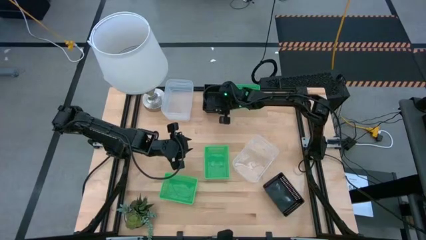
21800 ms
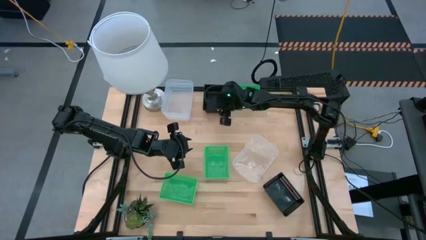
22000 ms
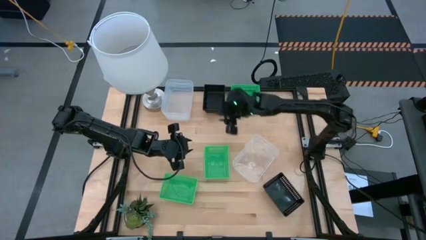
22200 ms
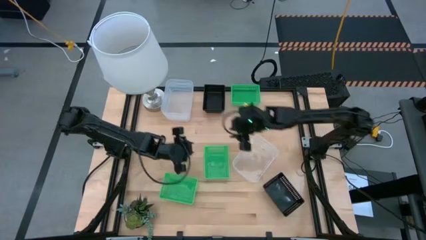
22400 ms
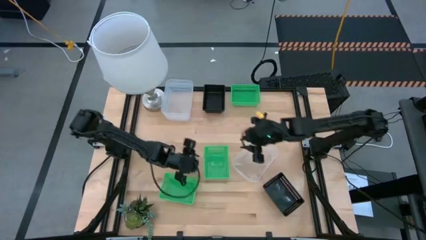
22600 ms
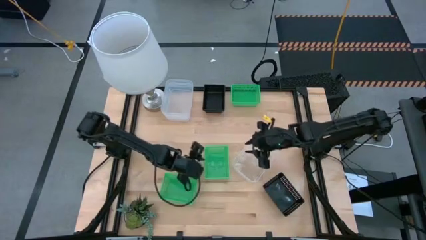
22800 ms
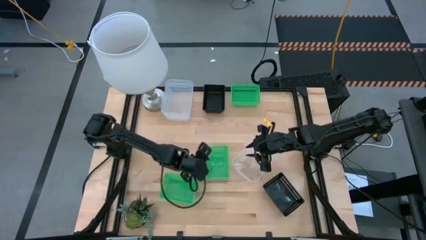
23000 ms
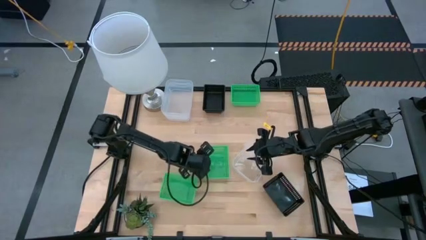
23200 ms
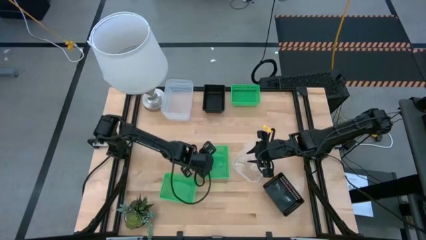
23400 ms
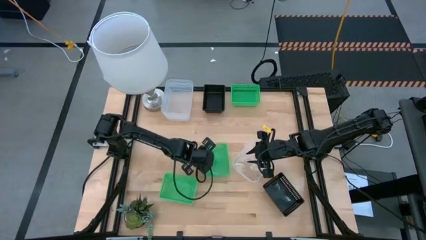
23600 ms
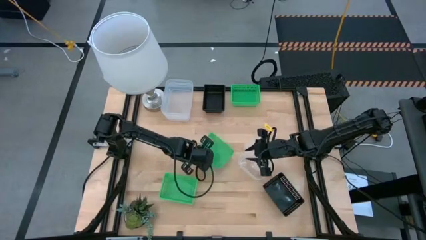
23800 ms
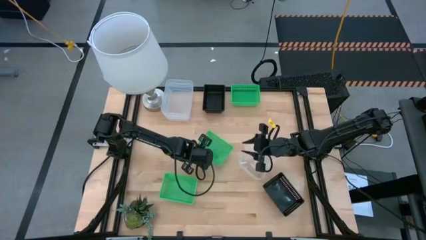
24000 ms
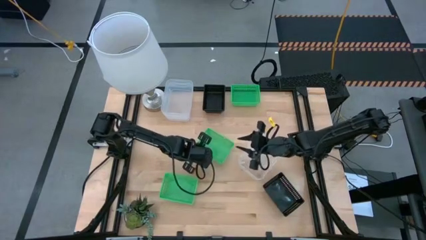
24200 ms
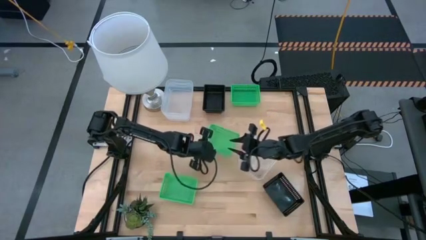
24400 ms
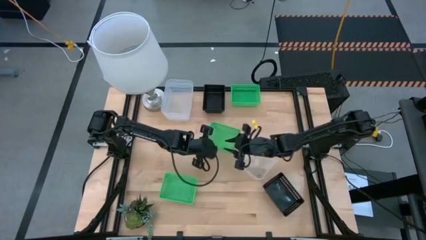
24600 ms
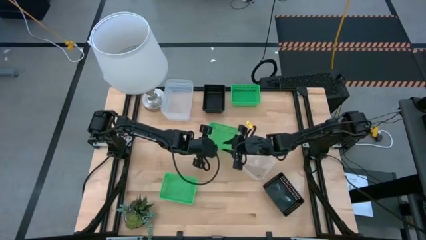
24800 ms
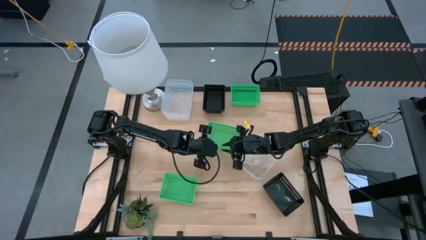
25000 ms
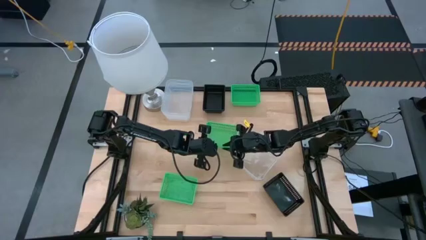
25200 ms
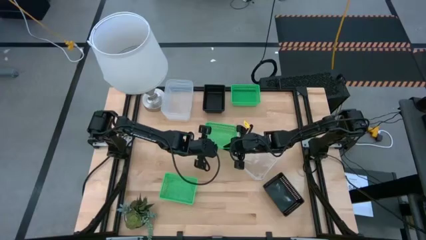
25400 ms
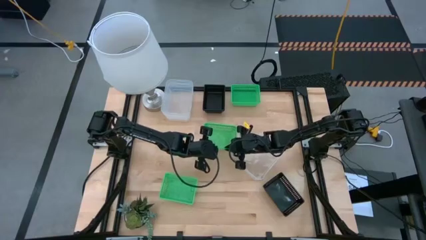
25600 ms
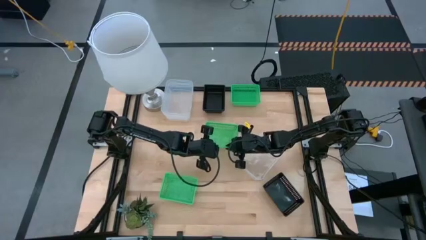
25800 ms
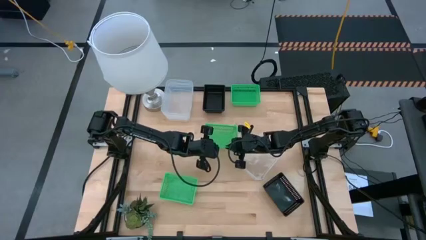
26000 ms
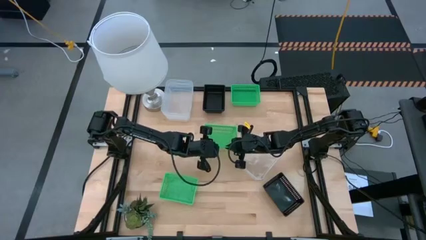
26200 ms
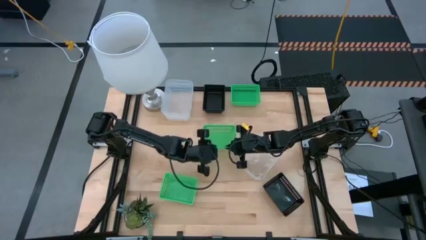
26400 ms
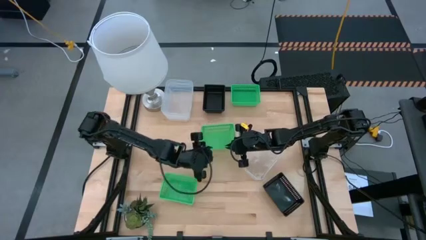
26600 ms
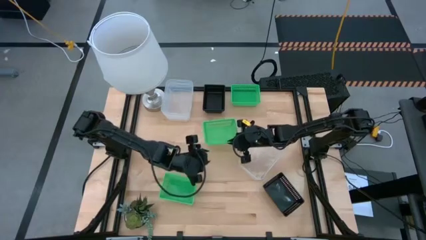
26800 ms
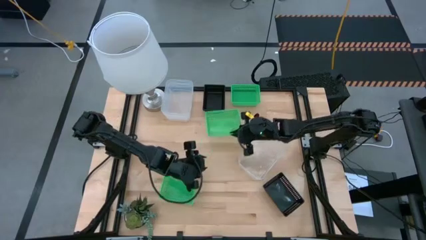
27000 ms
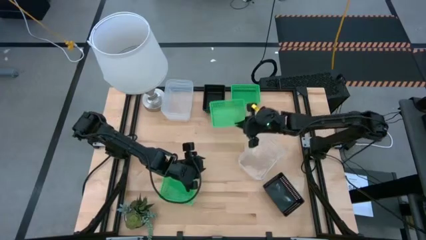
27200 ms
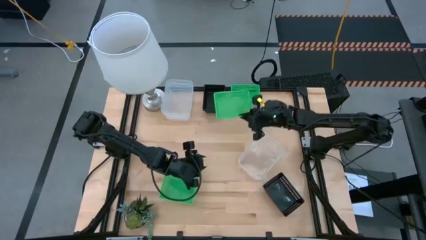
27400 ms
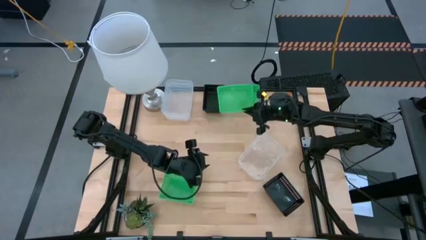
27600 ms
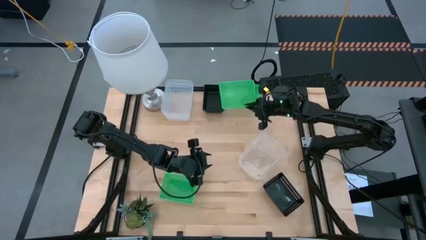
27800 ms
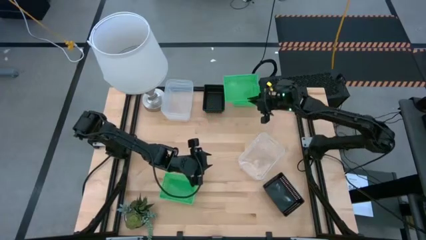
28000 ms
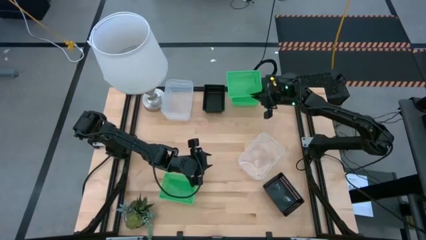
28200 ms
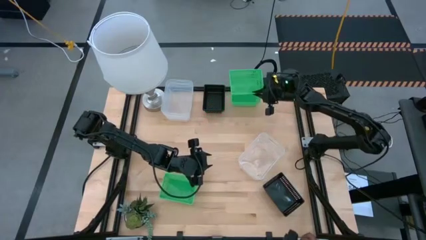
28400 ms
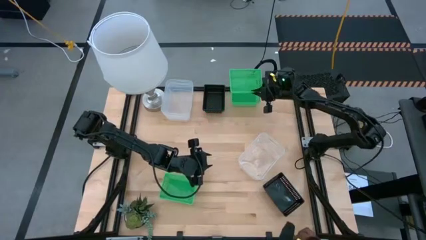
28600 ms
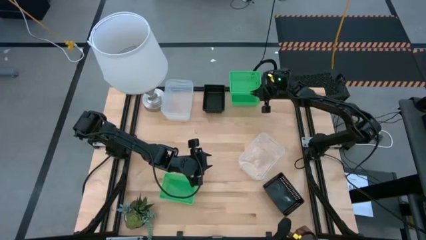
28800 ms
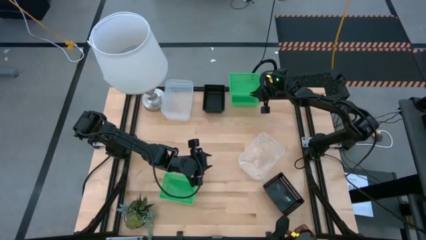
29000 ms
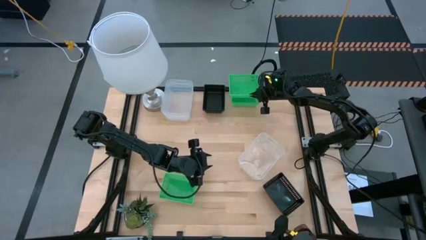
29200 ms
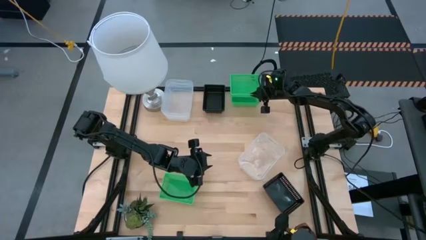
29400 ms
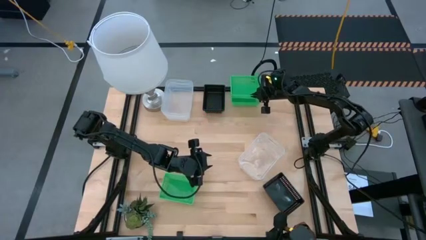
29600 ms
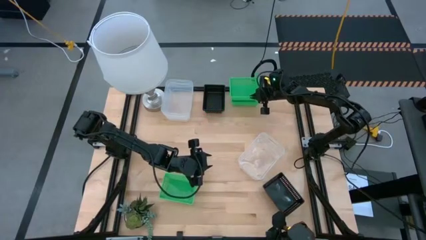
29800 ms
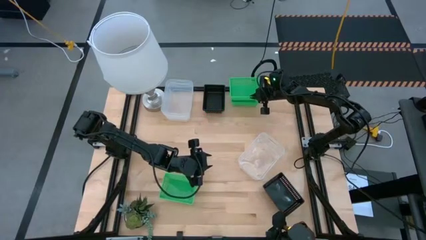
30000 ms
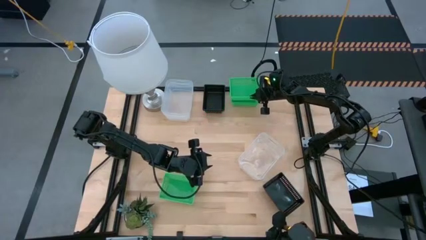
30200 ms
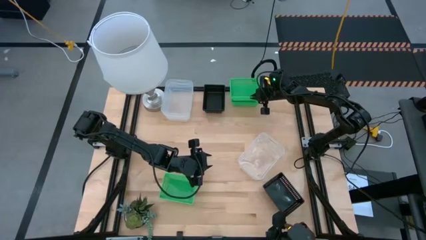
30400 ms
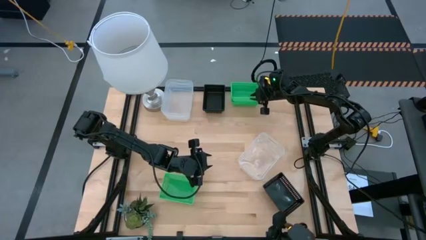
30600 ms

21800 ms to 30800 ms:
Stack the middle green bin on the top green bin
